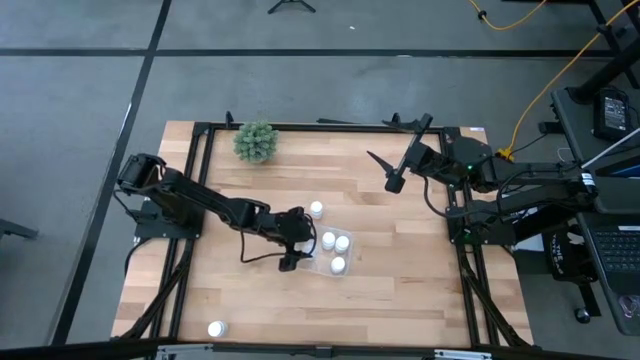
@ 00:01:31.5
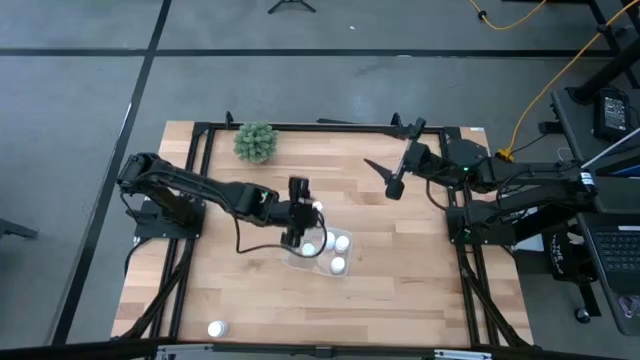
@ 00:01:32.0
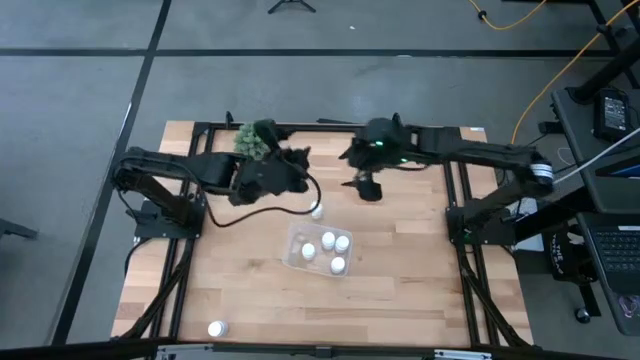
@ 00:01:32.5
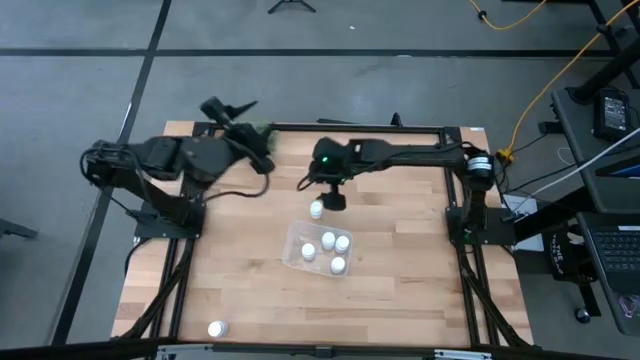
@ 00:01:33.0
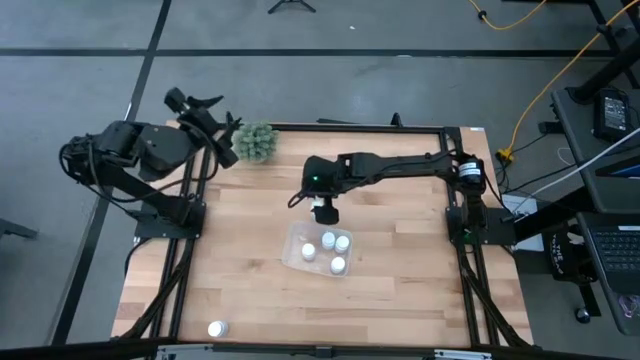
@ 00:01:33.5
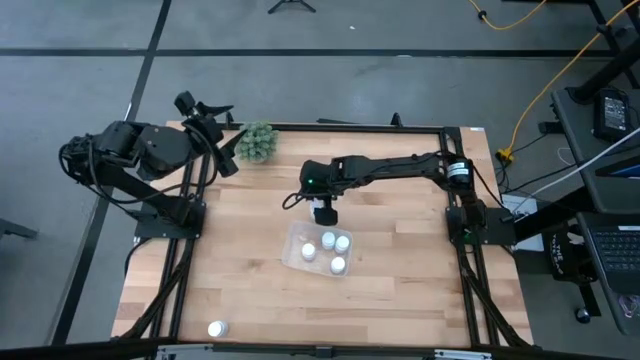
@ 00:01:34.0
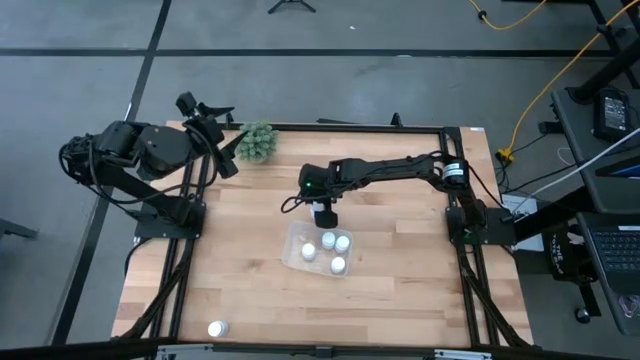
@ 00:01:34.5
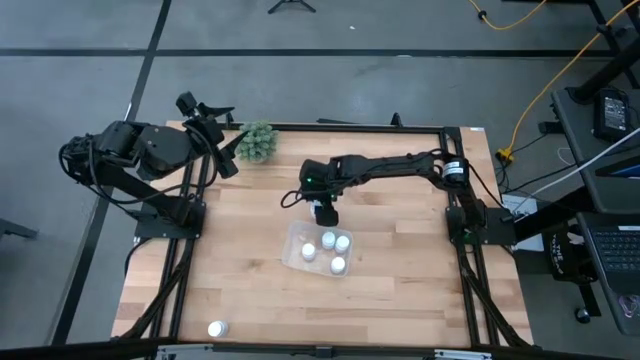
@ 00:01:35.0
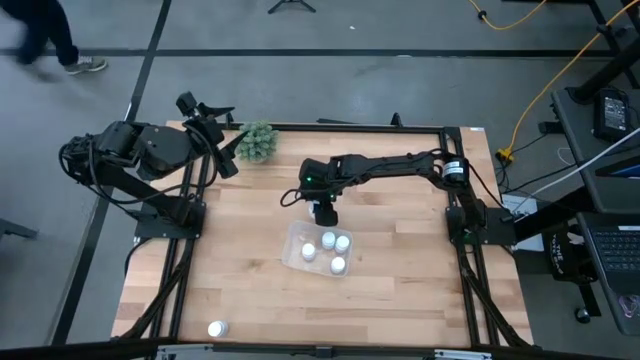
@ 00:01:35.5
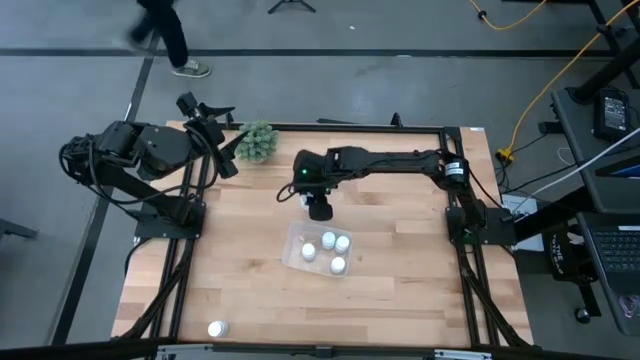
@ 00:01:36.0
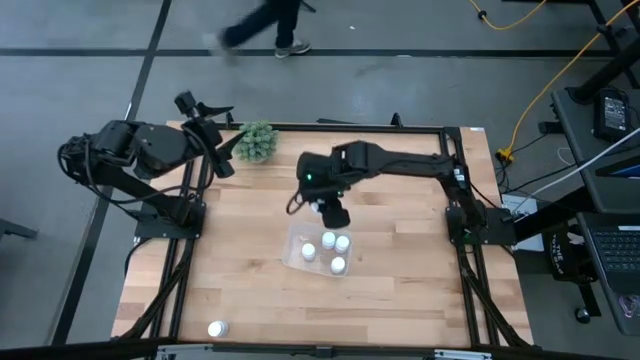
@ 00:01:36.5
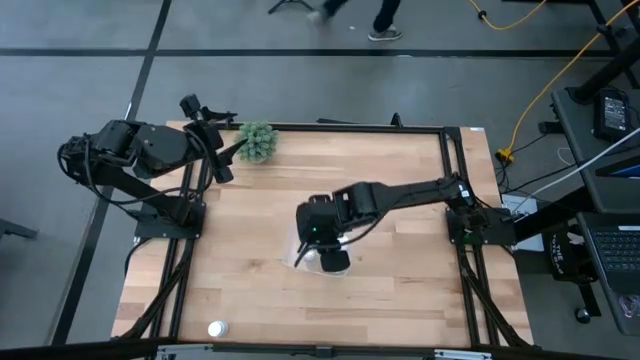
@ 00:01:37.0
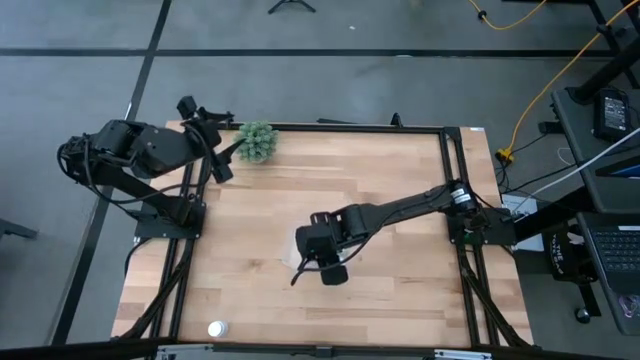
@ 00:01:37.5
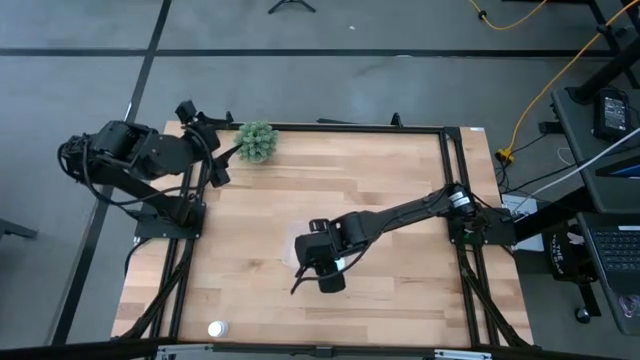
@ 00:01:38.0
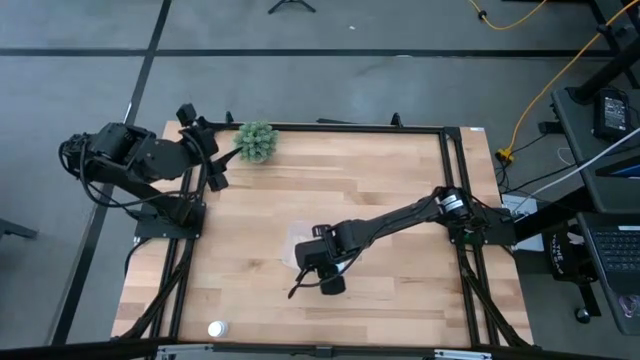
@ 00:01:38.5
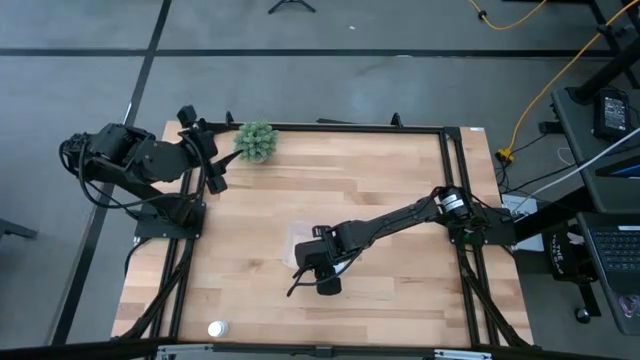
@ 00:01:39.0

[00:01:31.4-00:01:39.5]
Task: Pick and place pill bottles into a basket
Put the white medicine bottle into the transparent bin

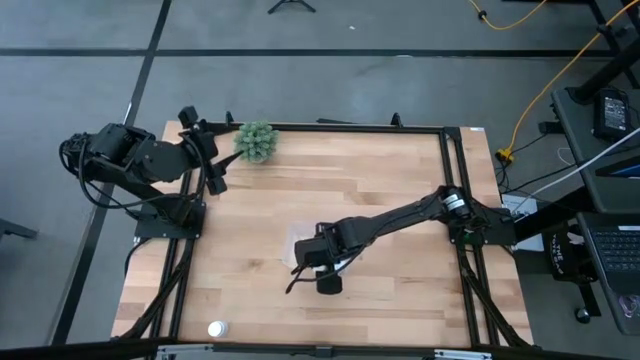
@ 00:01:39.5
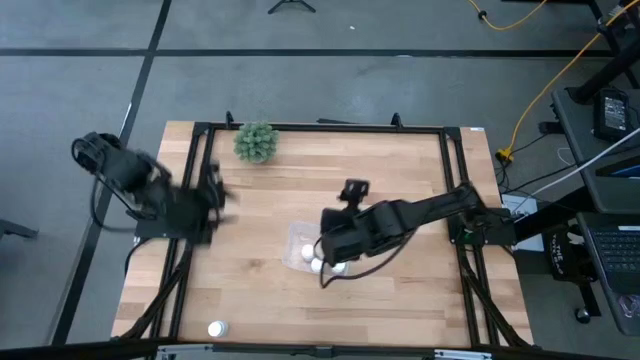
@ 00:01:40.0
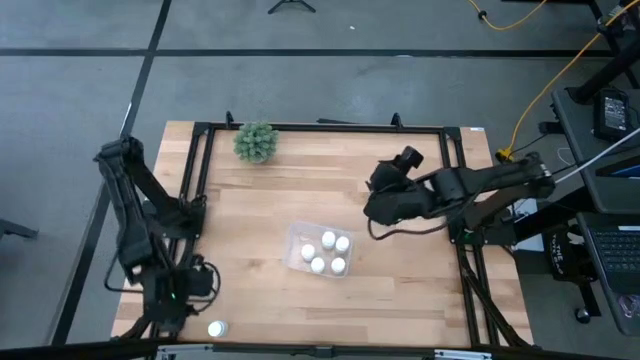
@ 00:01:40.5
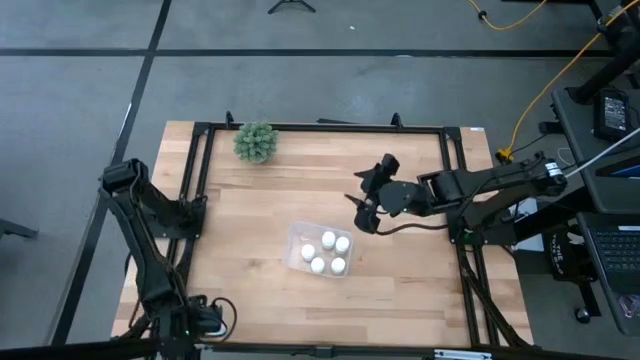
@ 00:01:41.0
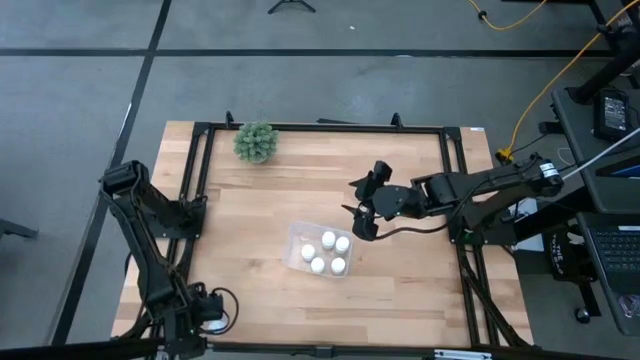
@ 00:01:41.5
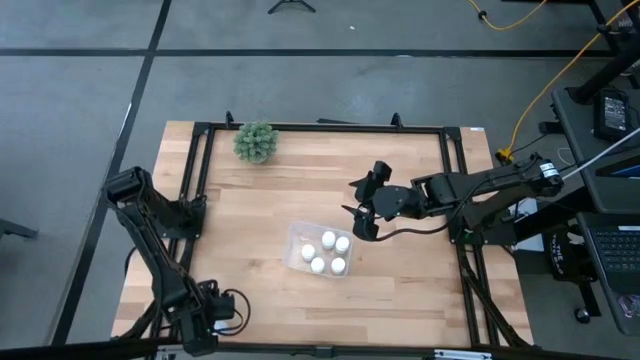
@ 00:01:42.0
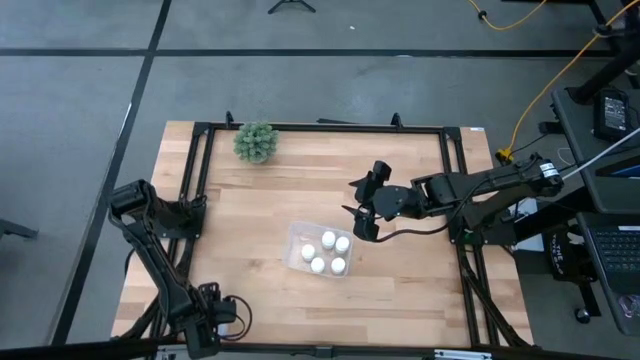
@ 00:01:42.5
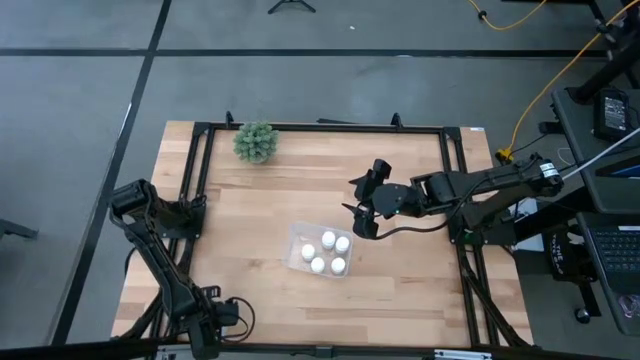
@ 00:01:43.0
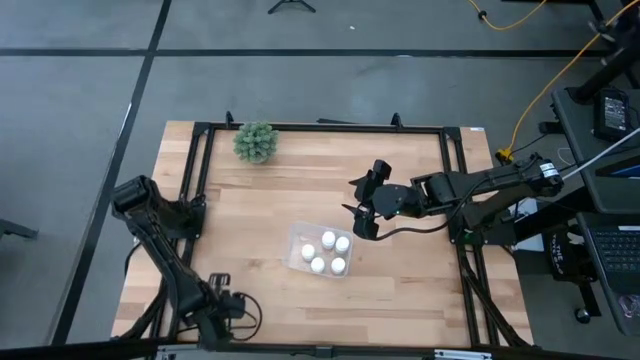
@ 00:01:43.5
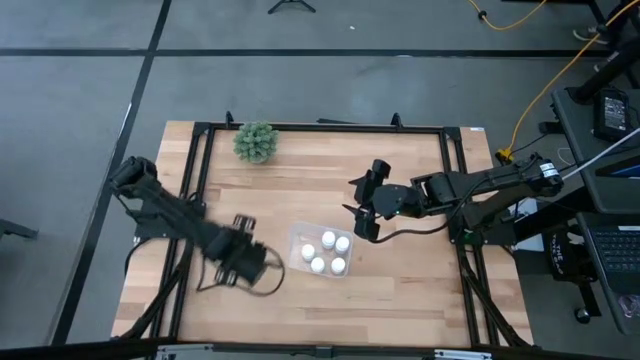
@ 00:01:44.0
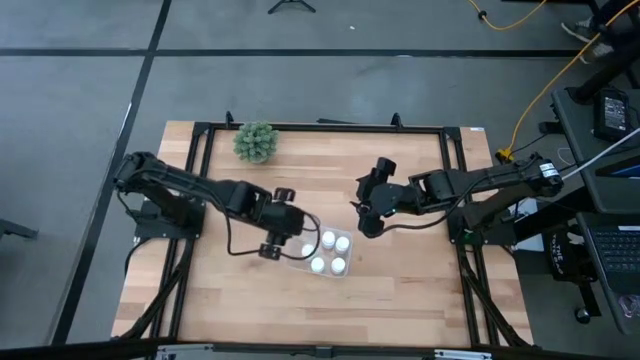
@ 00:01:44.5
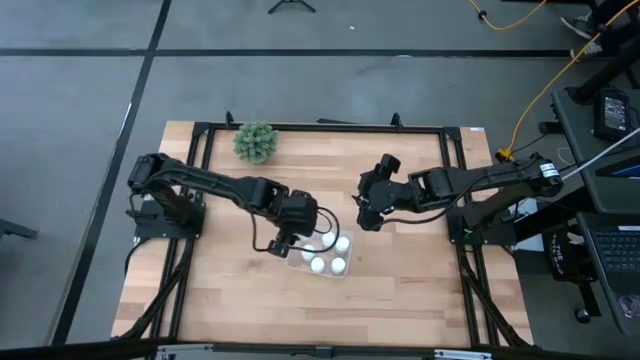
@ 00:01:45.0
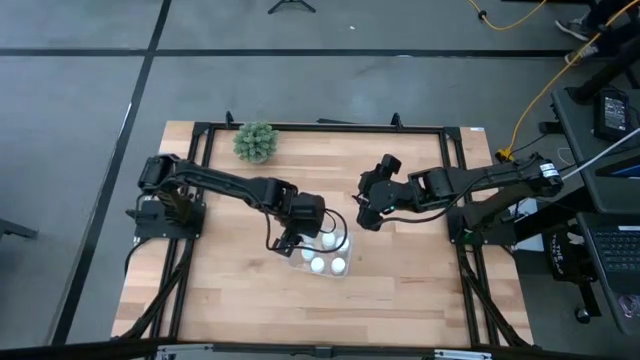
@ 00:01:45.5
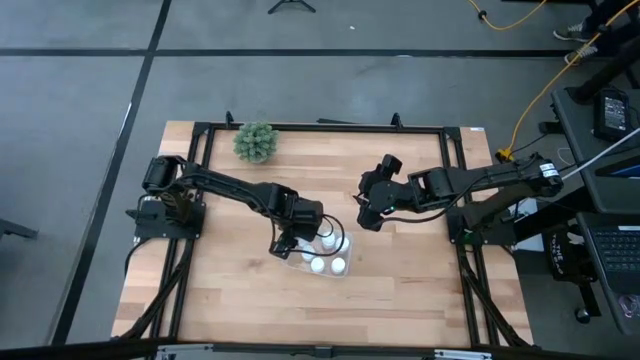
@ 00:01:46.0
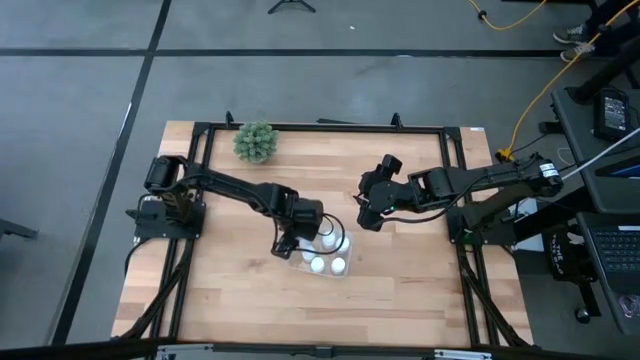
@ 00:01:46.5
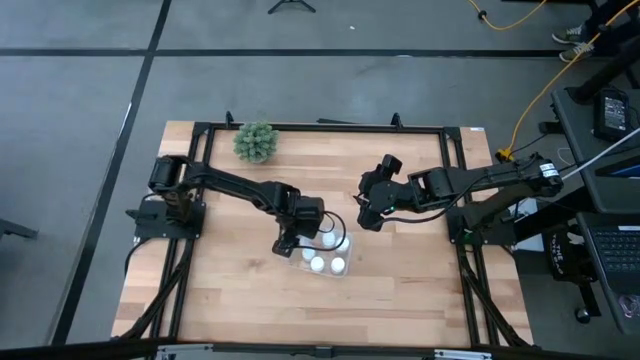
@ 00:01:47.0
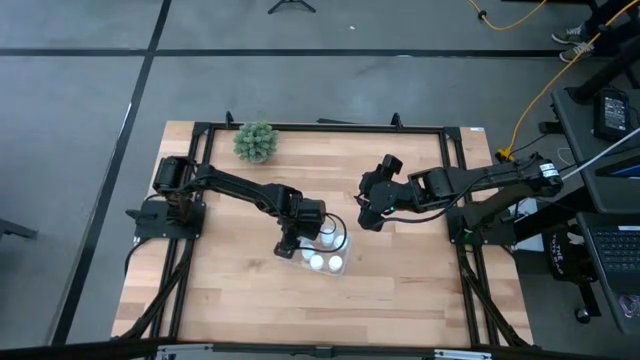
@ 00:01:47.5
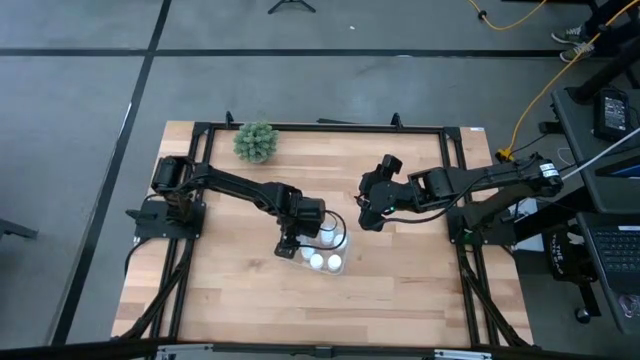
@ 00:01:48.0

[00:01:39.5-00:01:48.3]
Put the white medicine bottle into the transparent bin

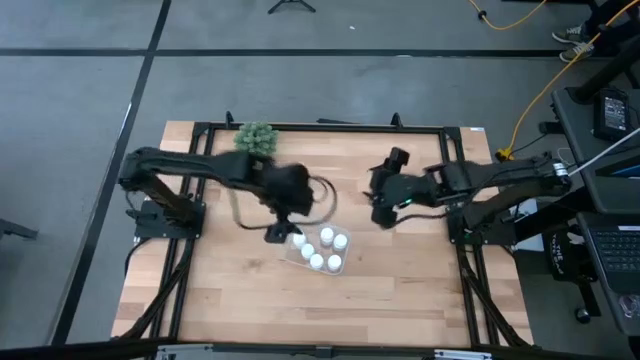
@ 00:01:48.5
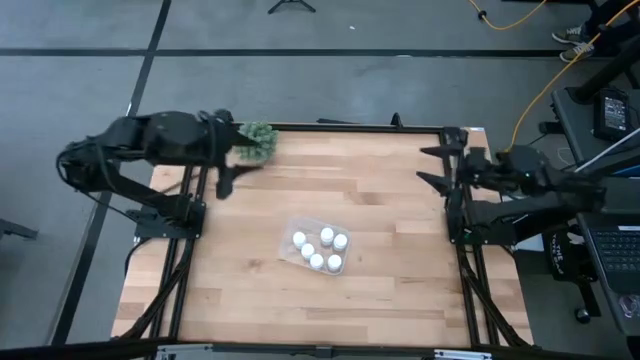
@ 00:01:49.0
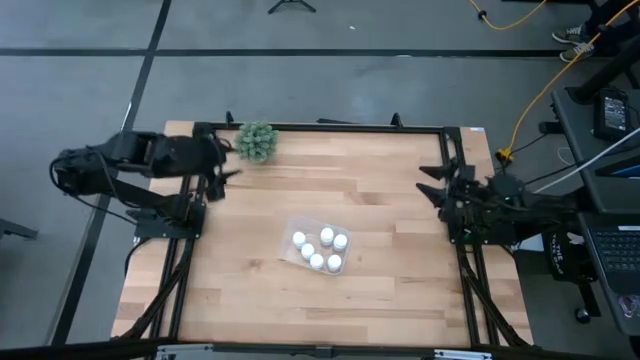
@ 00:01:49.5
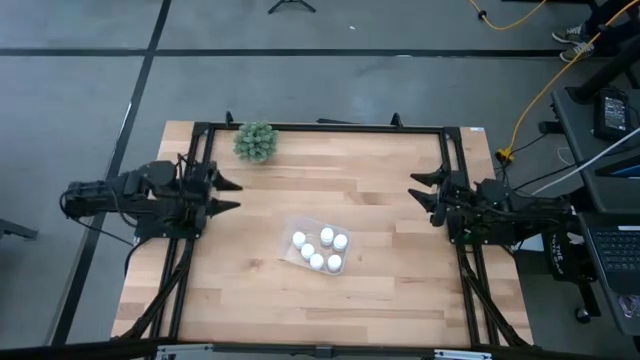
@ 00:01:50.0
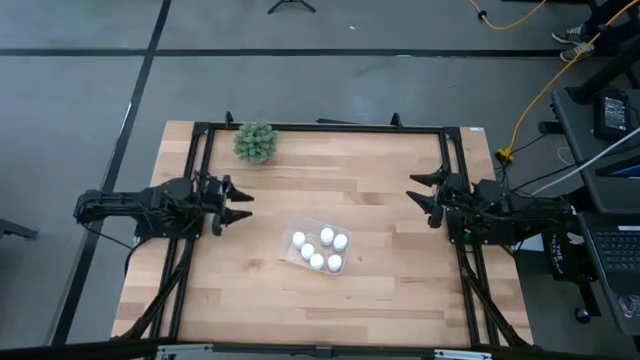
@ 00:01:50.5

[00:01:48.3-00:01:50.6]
Return to Home Position

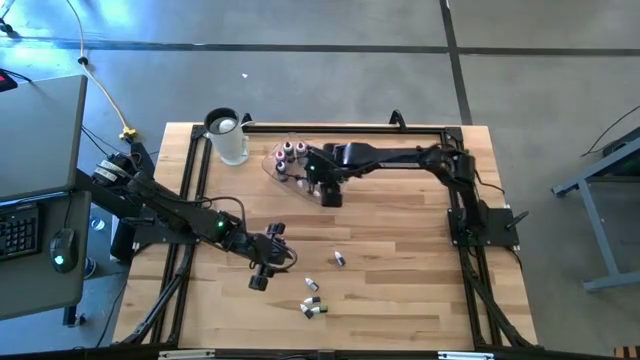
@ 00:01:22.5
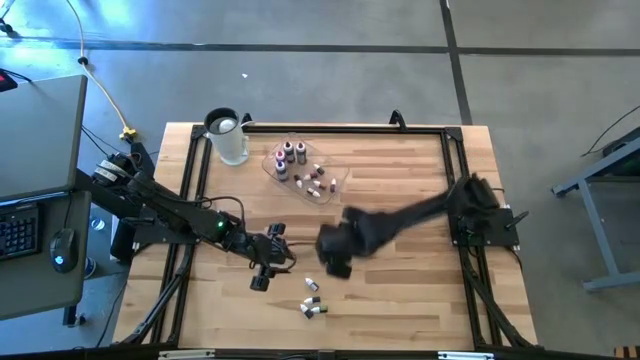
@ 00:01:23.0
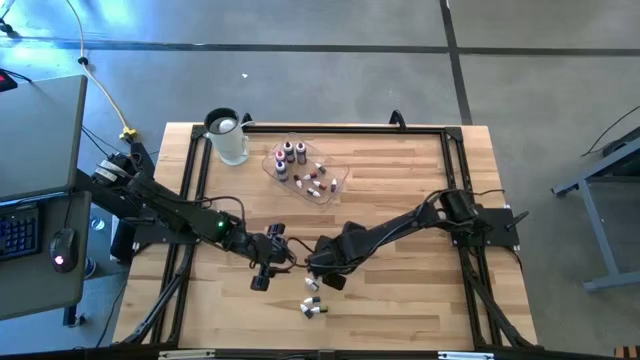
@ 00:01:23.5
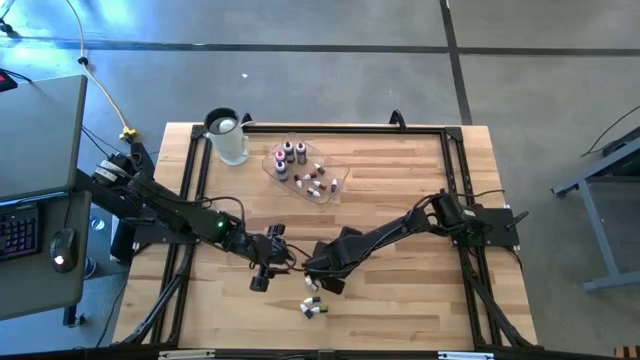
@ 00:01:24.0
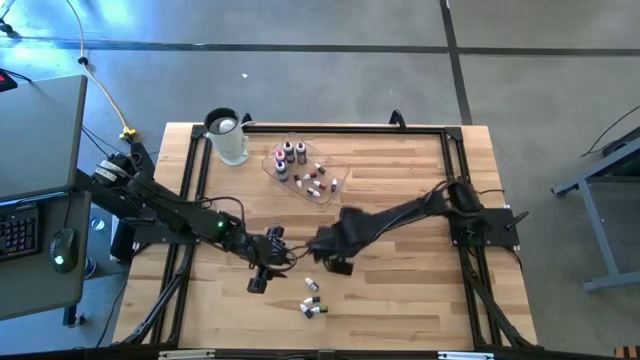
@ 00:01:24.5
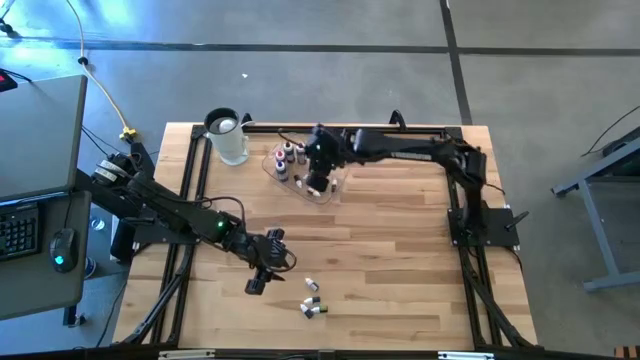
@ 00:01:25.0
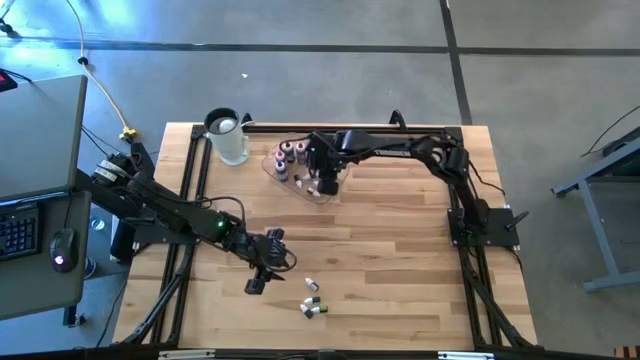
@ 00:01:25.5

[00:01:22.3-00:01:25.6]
Task: Pick & Place food coloring
Put the top small purple food coloring bottle into the bin
